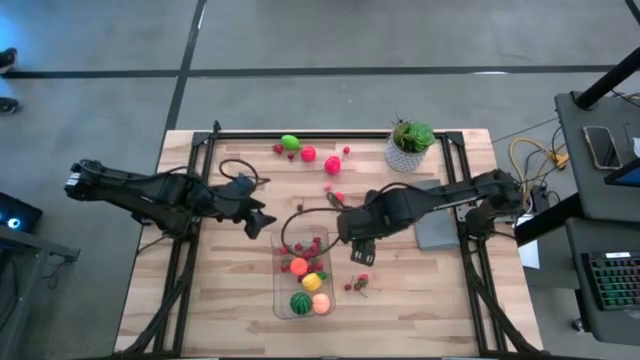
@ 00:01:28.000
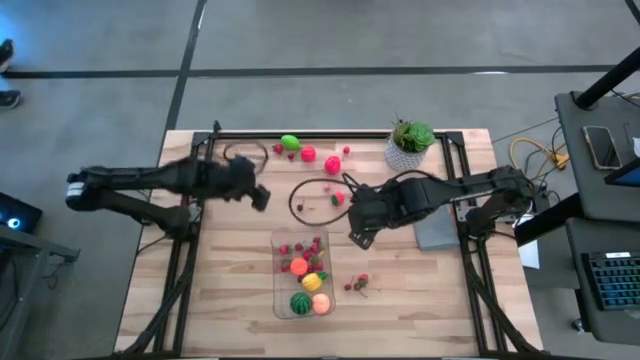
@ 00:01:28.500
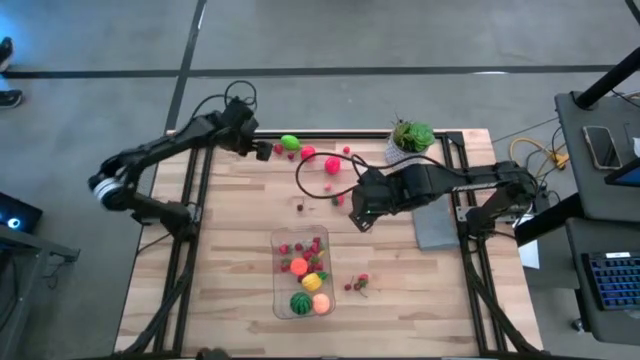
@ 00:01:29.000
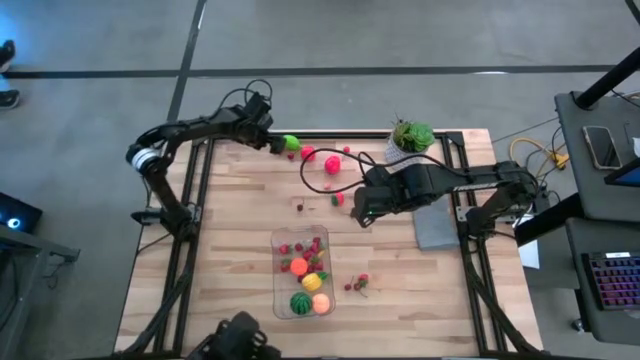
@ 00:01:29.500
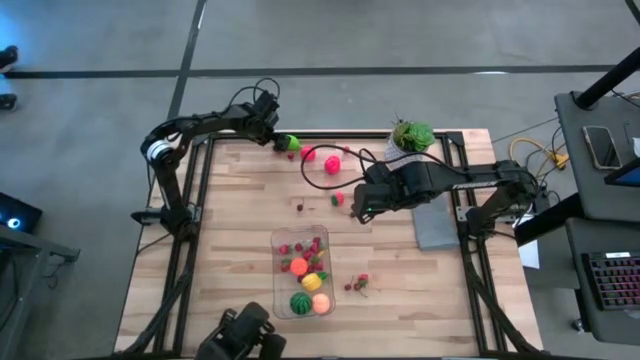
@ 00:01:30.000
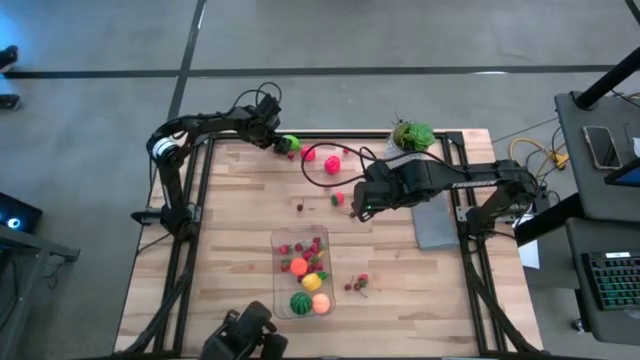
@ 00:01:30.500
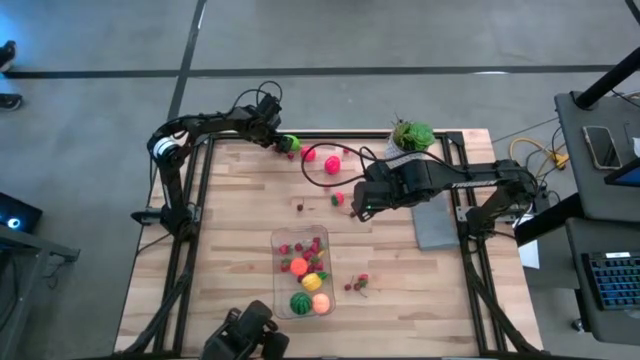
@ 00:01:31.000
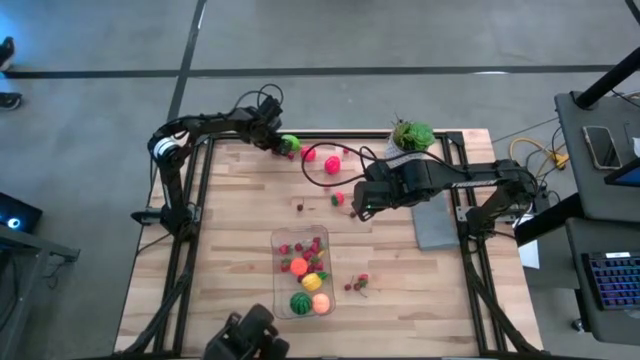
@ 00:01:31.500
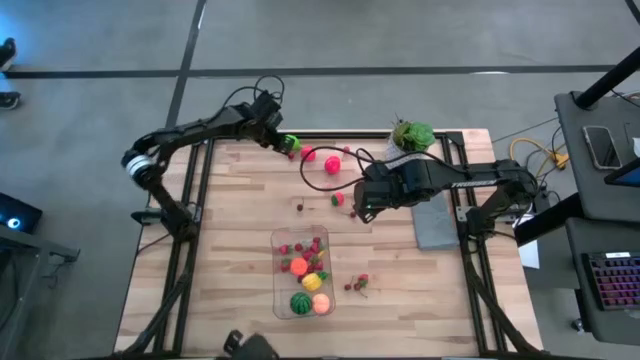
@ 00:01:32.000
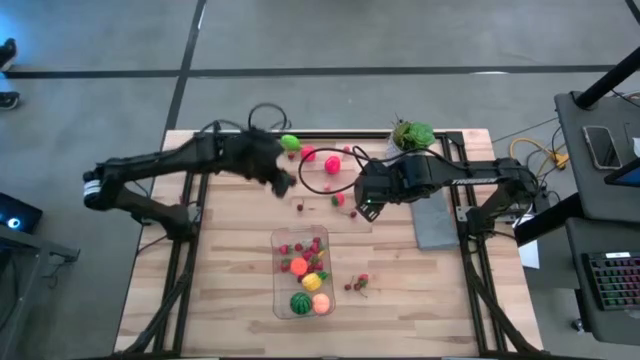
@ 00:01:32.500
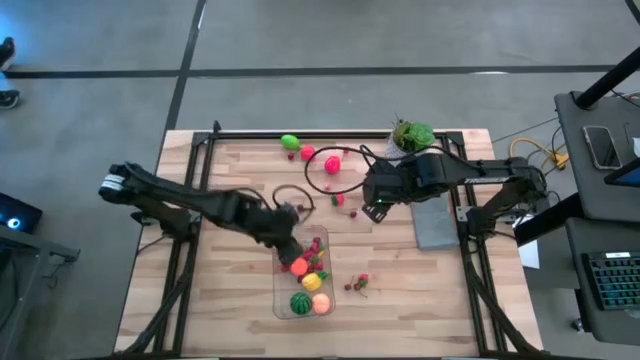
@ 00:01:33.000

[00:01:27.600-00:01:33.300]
Task: Pick and placing Produce into tupperware
Put the red strawberry into the transparent bin

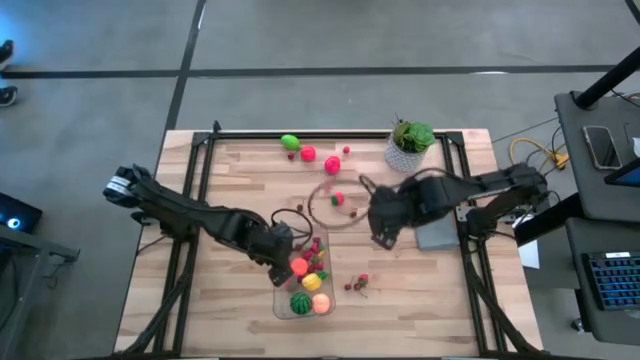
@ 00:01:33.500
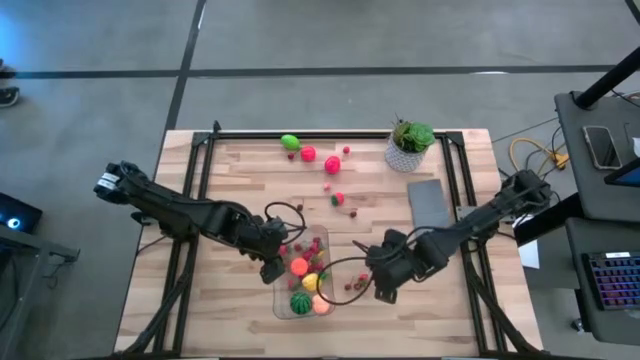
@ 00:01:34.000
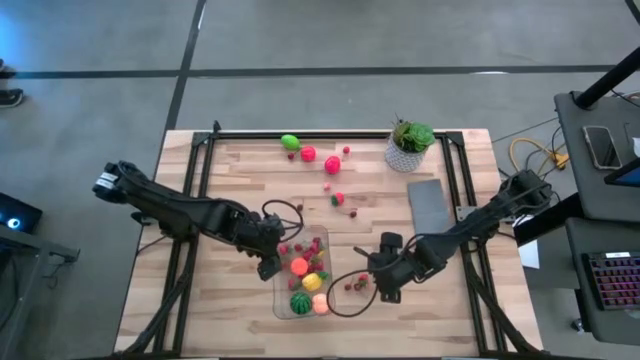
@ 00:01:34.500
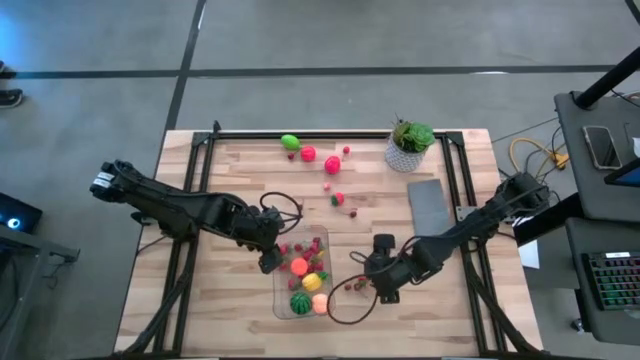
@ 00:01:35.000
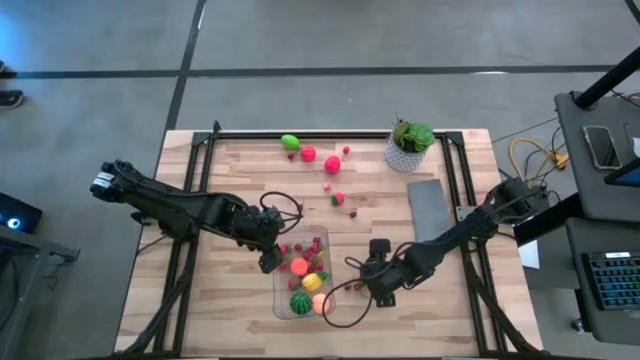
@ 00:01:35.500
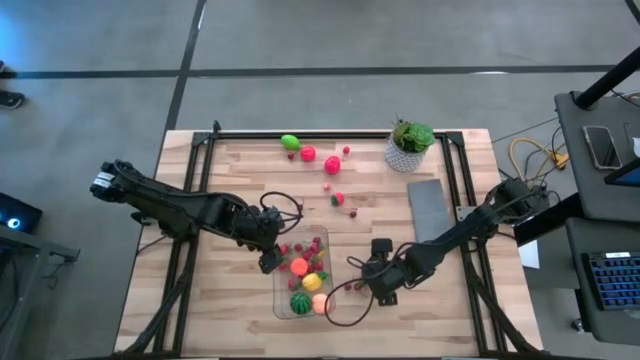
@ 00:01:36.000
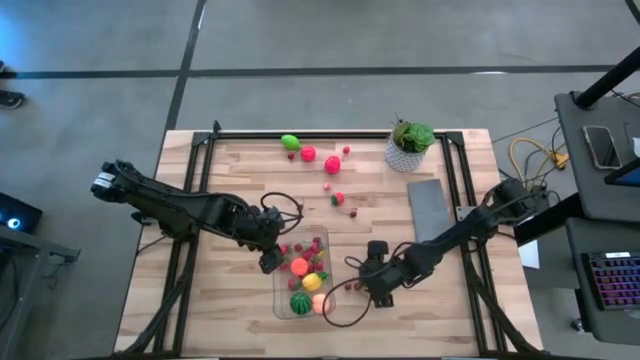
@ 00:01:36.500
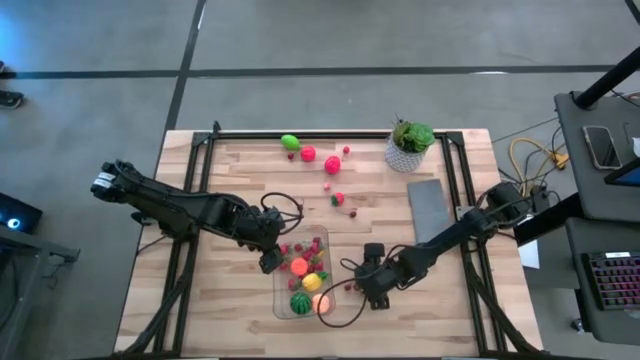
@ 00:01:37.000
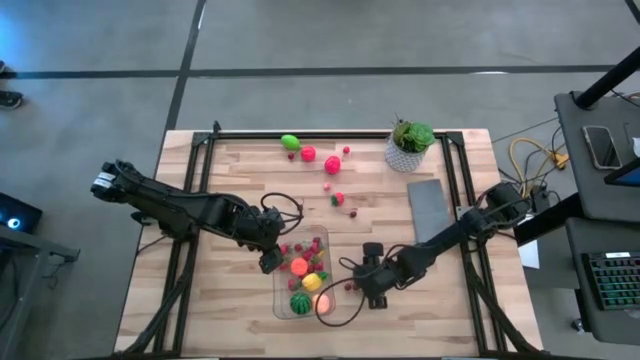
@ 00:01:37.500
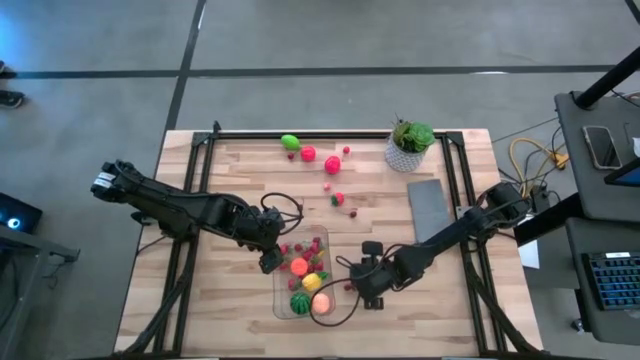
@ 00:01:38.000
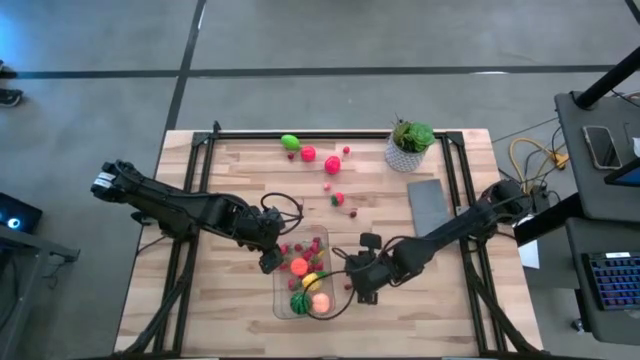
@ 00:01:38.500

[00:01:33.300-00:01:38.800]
Put the red strawberry into the transparent bin

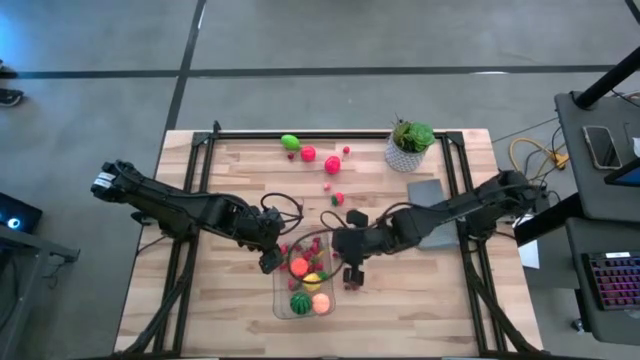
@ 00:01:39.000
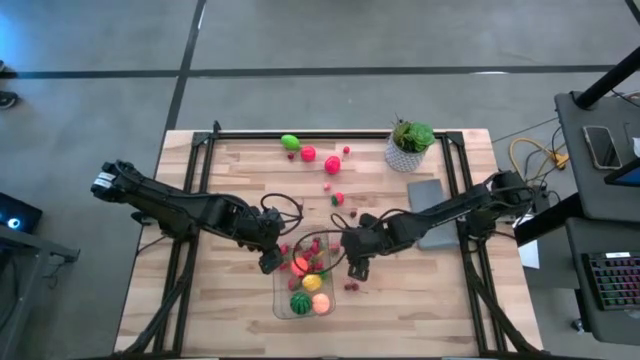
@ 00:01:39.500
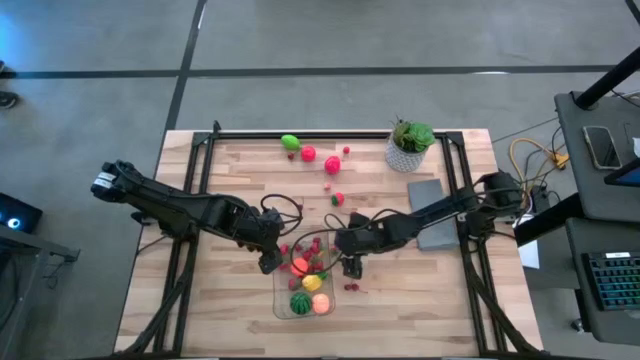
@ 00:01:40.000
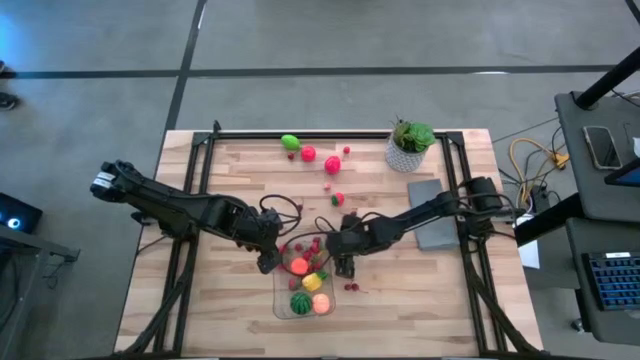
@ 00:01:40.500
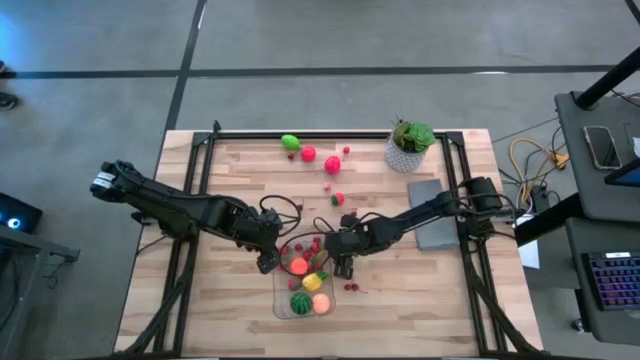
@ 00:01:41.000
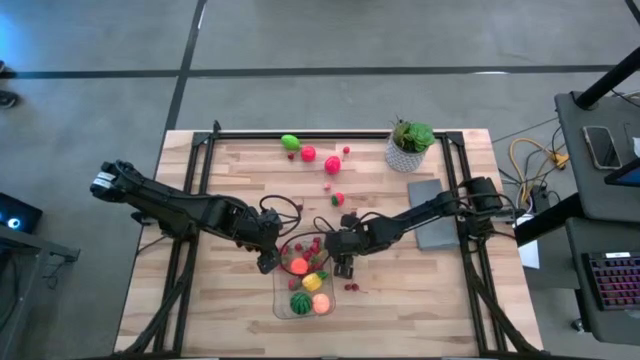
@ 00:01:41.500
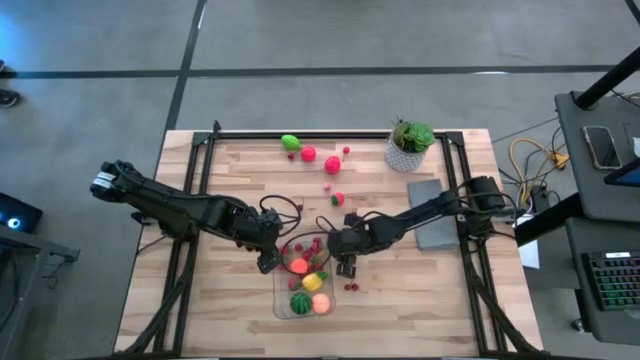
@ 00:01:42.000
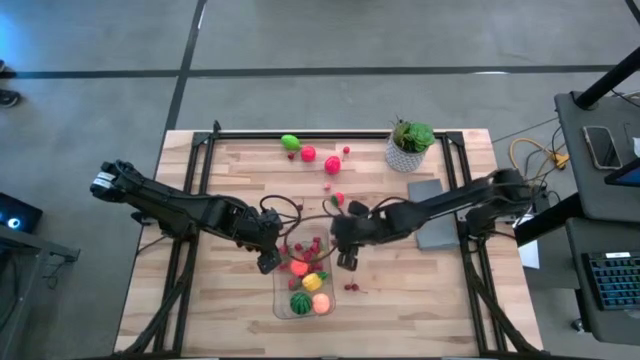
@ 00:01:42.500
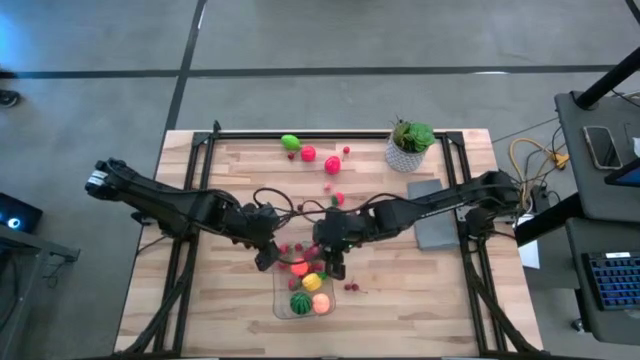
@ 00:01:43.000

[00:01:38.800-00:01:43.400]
Put the red strawberry into the transparent bin

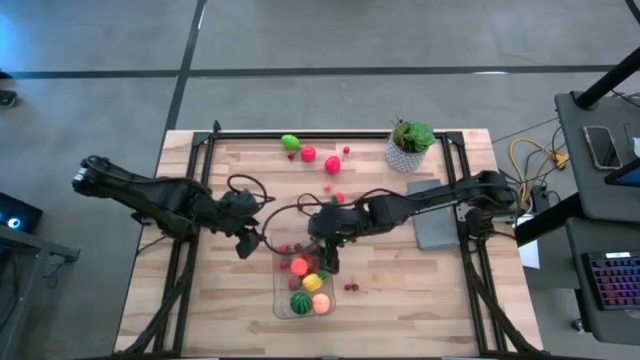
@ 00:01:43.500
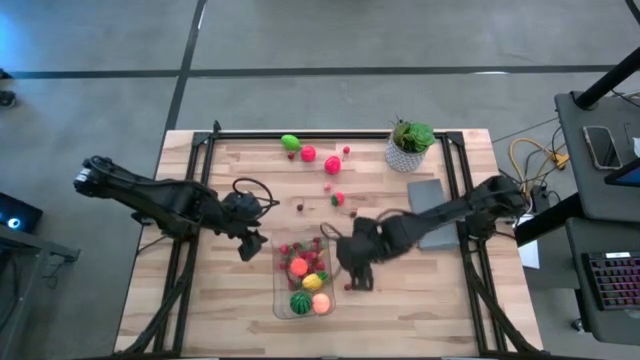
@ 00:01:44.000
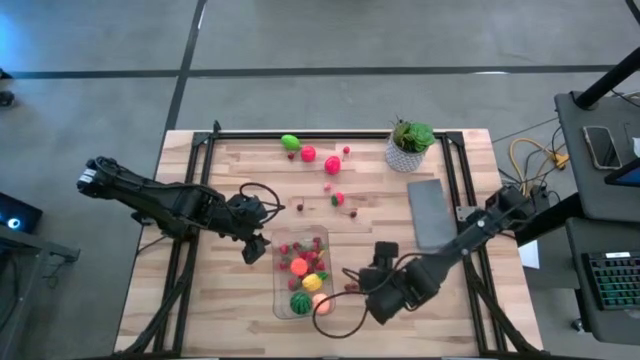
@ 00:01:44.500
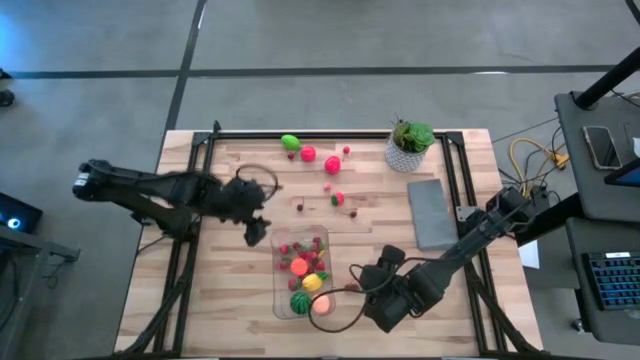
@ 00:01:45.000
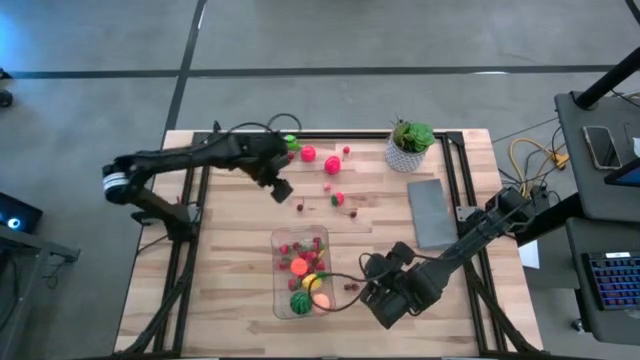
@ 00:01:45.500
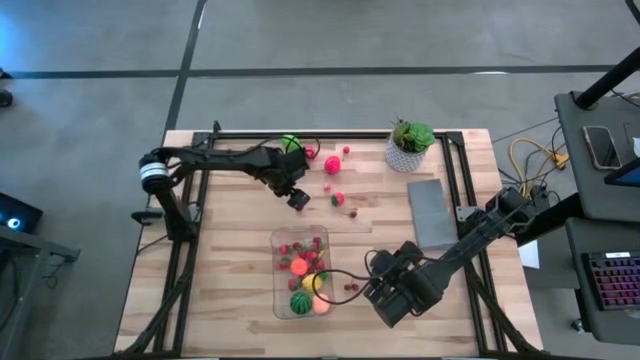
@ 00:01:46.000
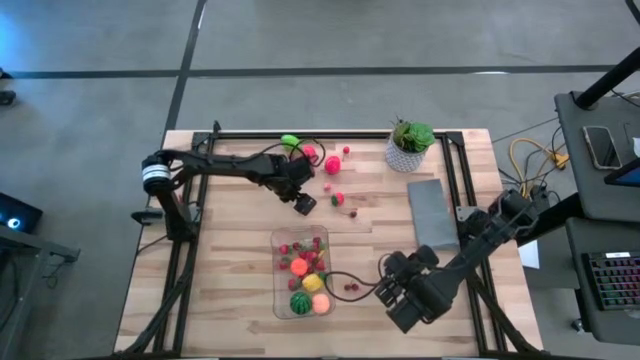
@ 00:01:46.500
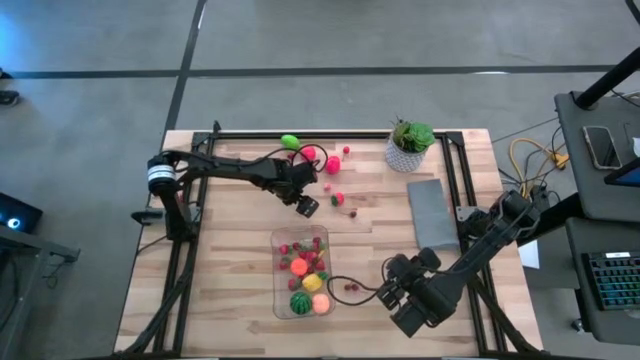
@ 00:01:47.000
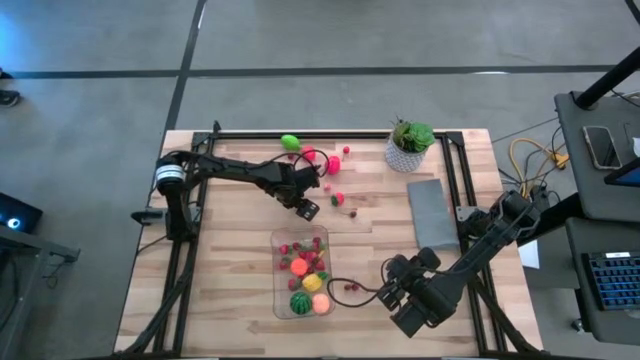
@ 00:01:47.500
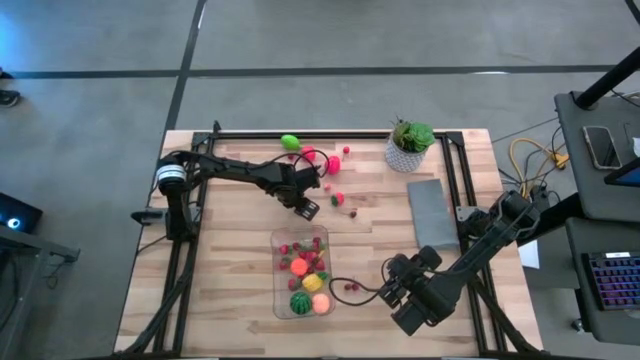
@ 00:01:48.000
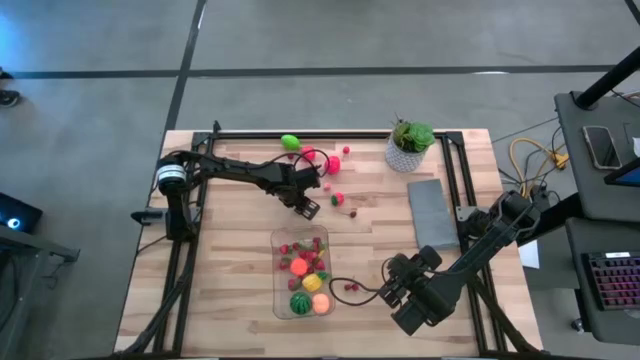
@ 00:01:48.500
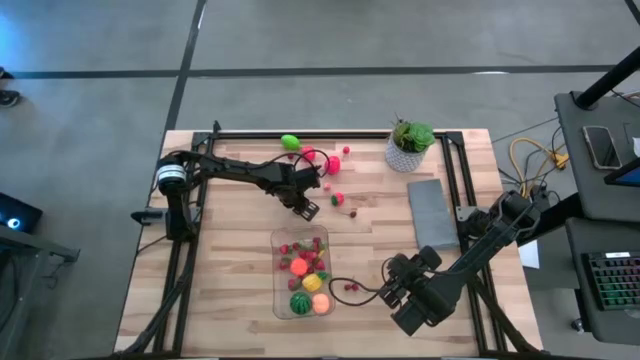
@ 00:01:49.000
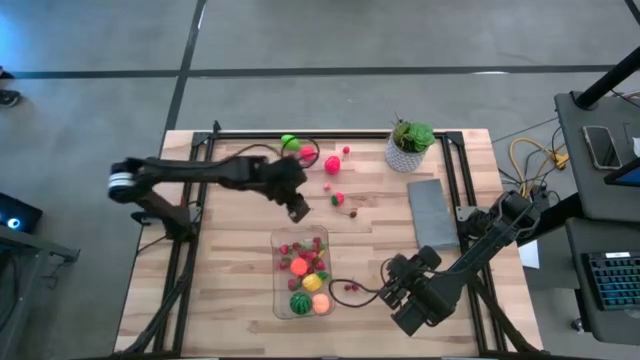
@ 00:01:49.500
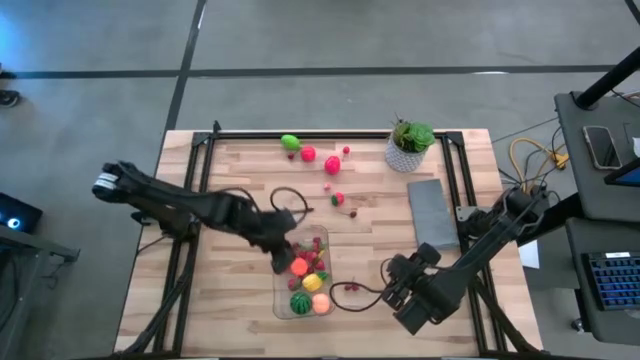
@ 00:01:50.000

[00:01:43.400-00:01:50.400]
Put the red cherry into the transparent bin
